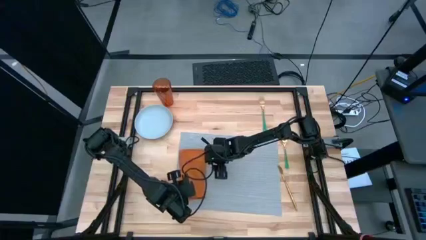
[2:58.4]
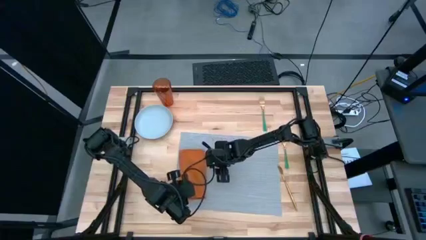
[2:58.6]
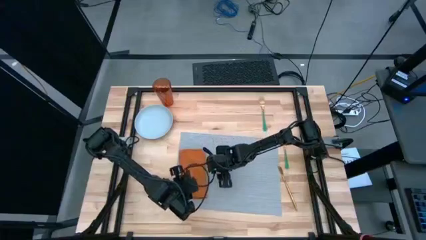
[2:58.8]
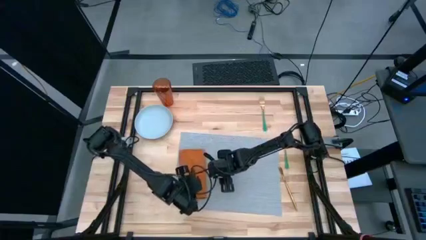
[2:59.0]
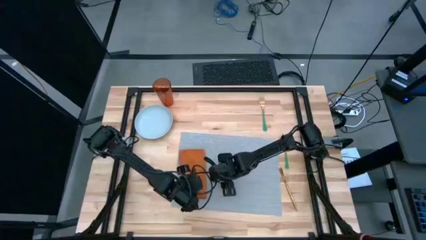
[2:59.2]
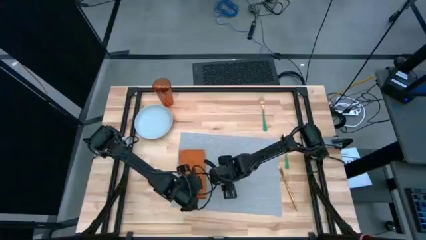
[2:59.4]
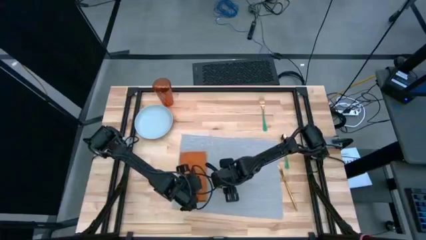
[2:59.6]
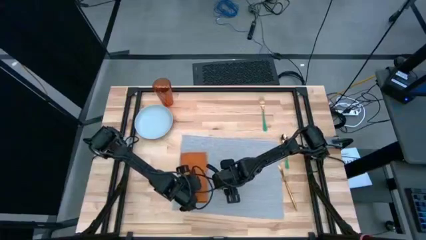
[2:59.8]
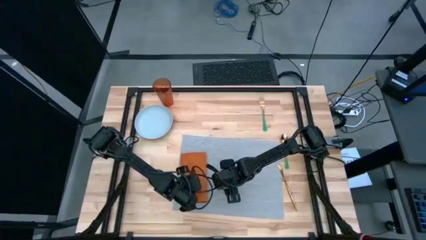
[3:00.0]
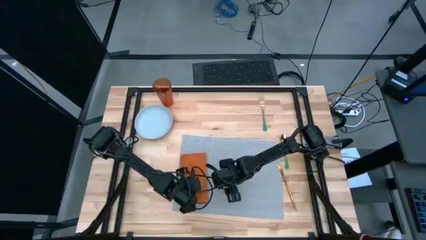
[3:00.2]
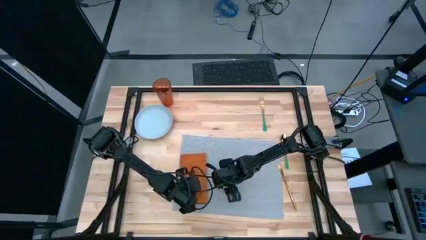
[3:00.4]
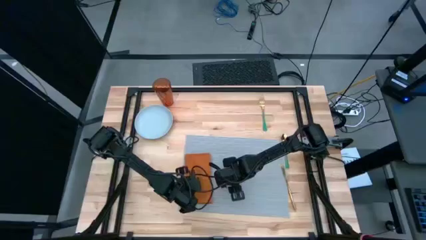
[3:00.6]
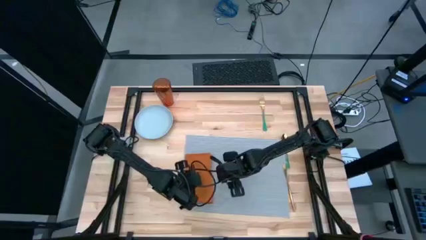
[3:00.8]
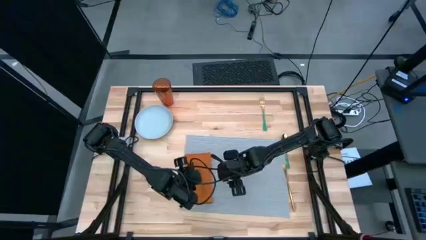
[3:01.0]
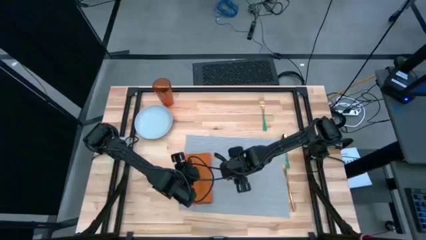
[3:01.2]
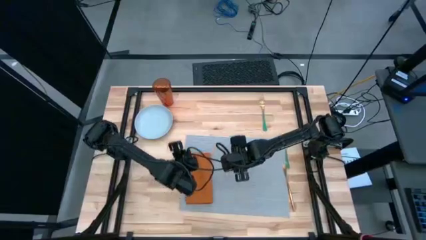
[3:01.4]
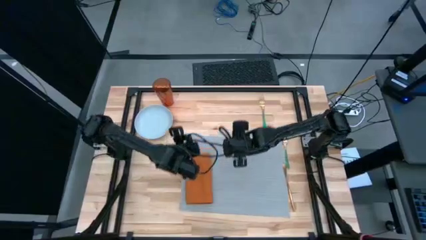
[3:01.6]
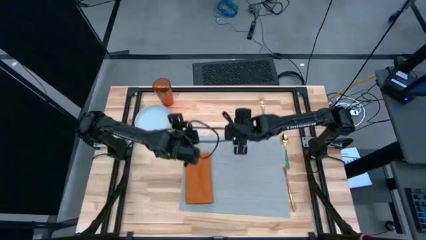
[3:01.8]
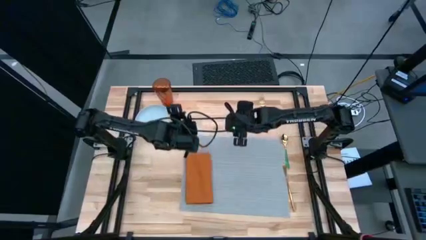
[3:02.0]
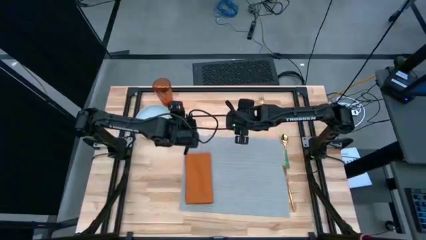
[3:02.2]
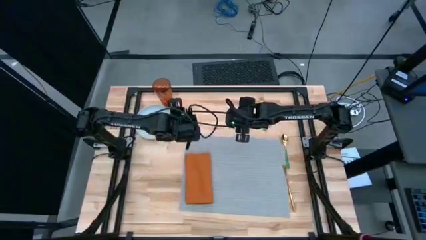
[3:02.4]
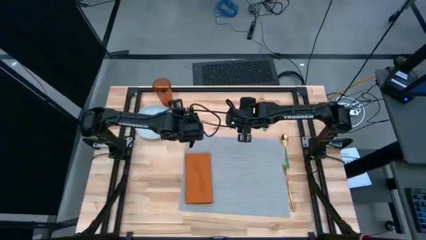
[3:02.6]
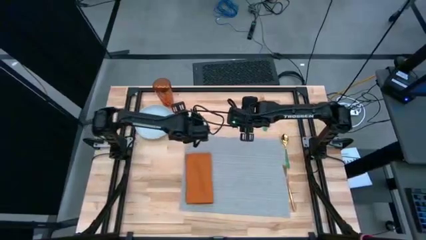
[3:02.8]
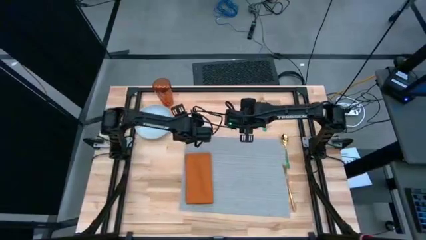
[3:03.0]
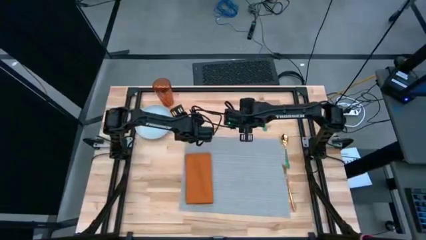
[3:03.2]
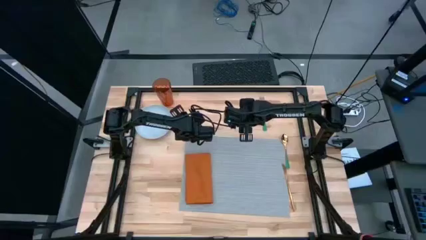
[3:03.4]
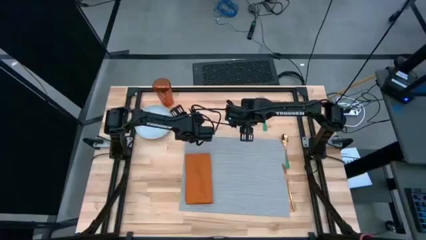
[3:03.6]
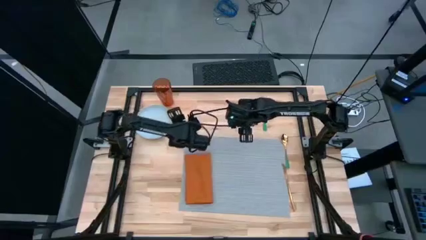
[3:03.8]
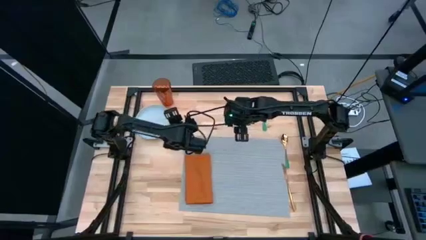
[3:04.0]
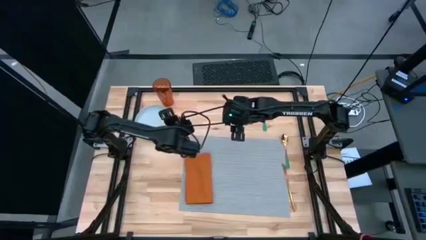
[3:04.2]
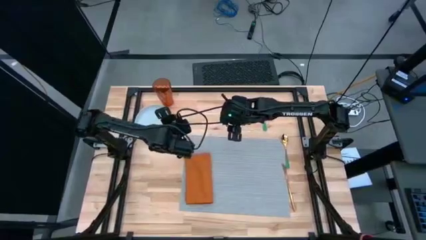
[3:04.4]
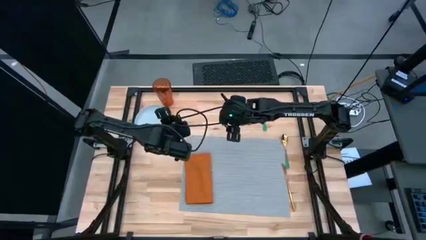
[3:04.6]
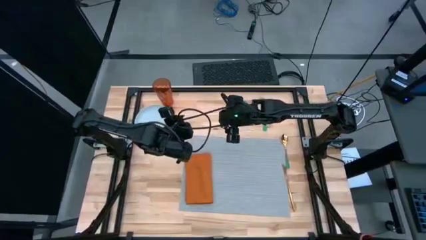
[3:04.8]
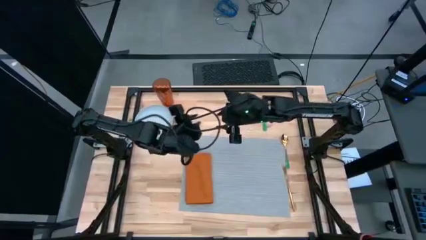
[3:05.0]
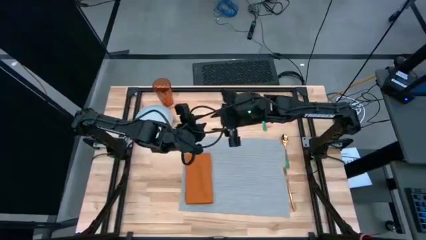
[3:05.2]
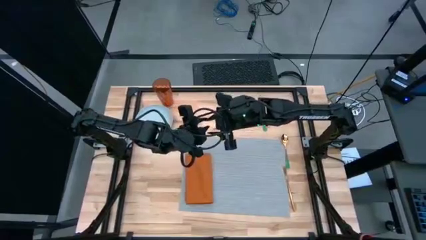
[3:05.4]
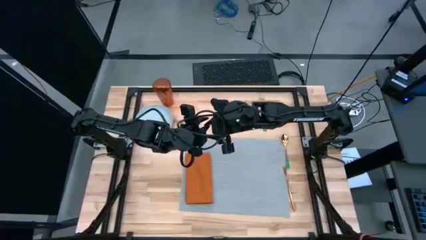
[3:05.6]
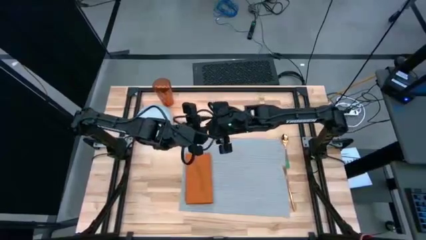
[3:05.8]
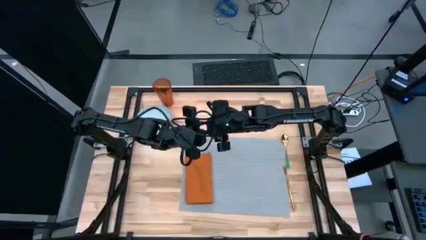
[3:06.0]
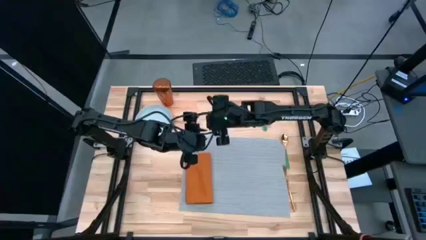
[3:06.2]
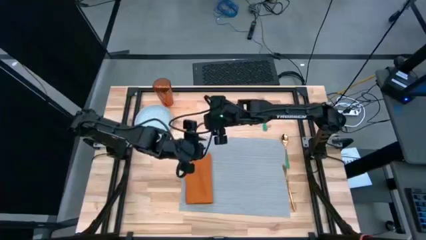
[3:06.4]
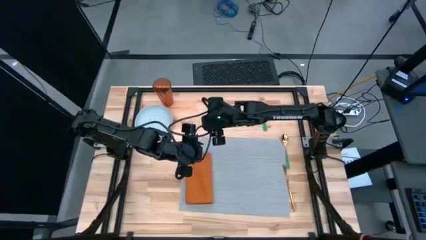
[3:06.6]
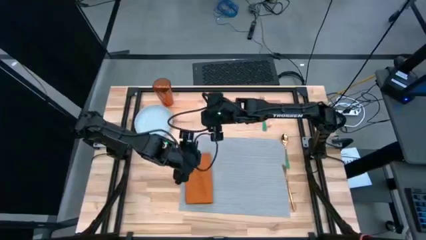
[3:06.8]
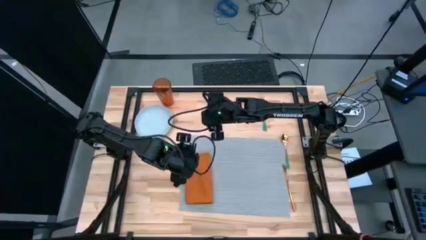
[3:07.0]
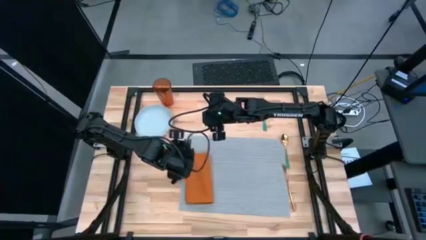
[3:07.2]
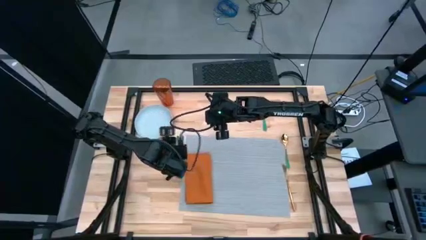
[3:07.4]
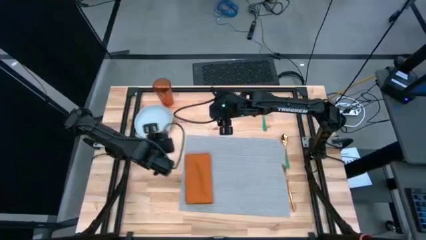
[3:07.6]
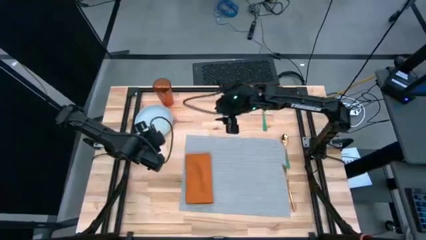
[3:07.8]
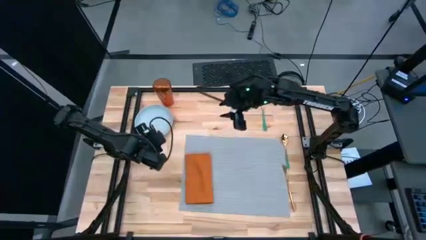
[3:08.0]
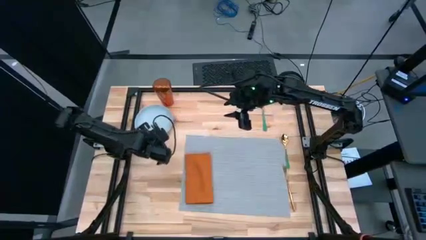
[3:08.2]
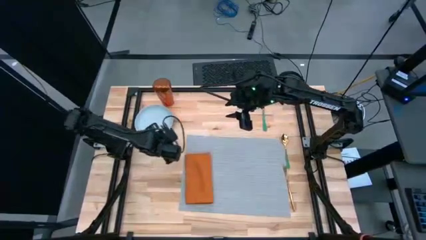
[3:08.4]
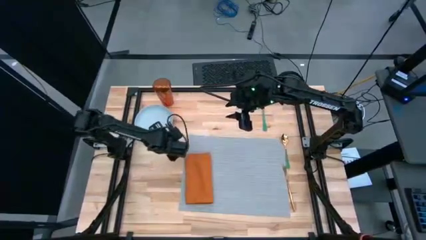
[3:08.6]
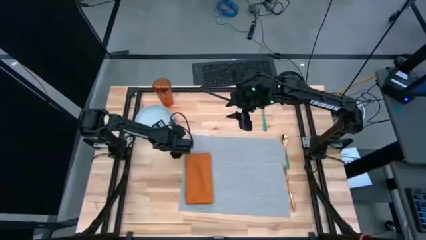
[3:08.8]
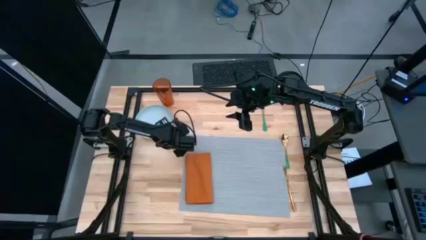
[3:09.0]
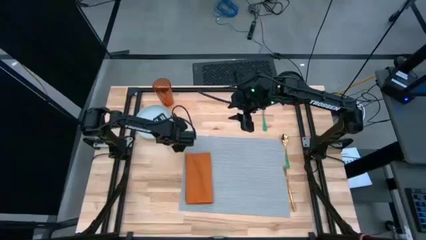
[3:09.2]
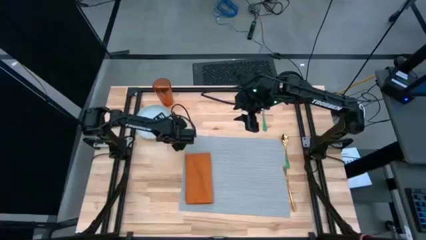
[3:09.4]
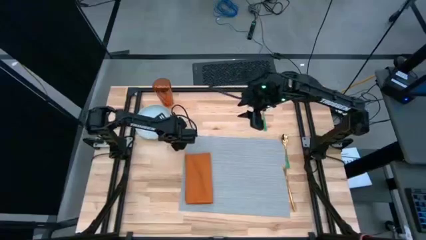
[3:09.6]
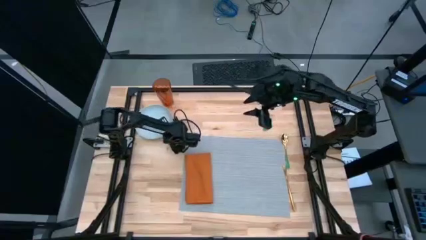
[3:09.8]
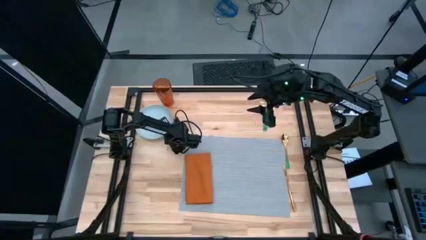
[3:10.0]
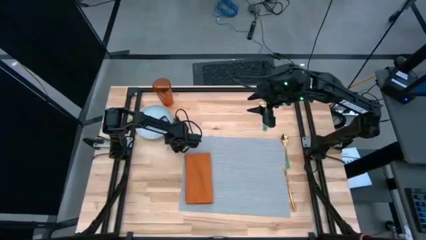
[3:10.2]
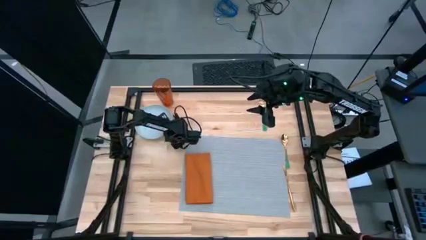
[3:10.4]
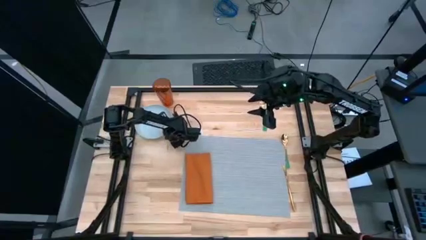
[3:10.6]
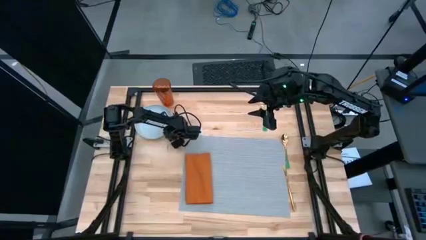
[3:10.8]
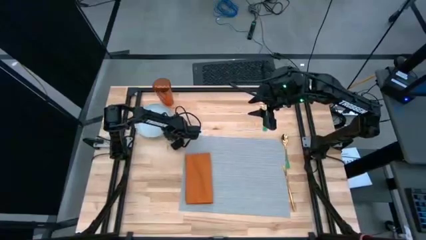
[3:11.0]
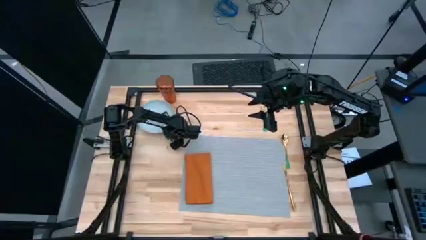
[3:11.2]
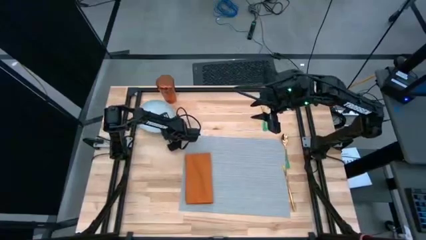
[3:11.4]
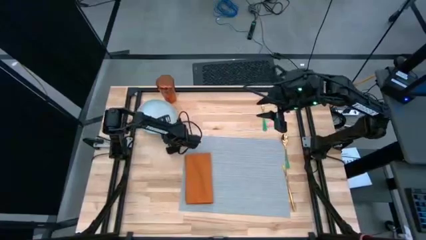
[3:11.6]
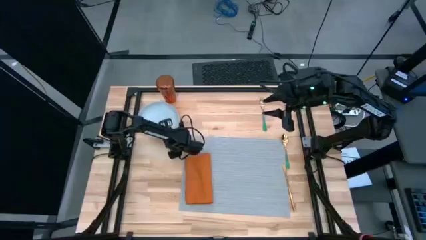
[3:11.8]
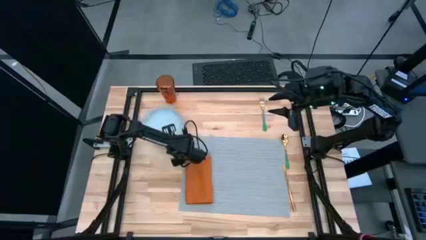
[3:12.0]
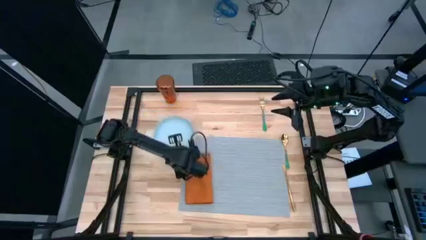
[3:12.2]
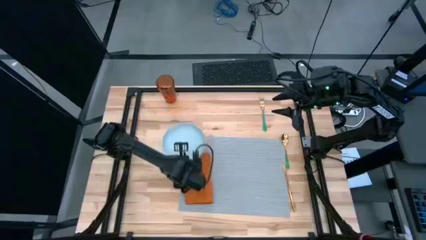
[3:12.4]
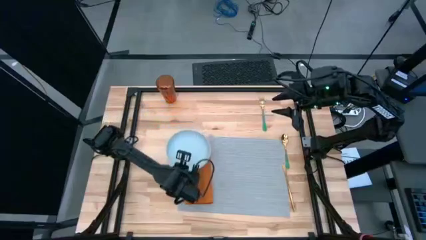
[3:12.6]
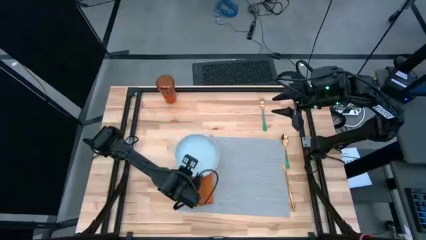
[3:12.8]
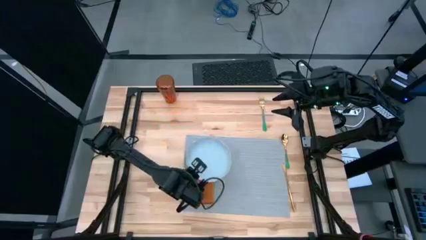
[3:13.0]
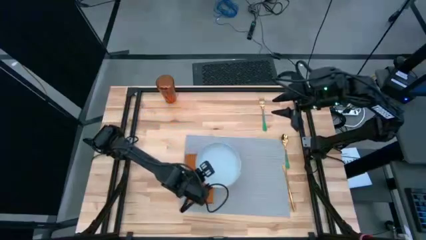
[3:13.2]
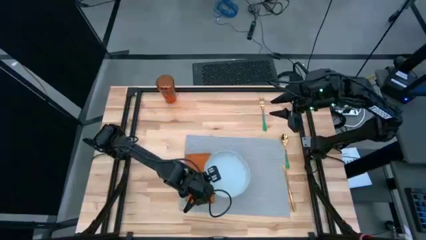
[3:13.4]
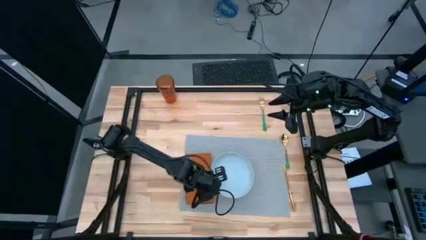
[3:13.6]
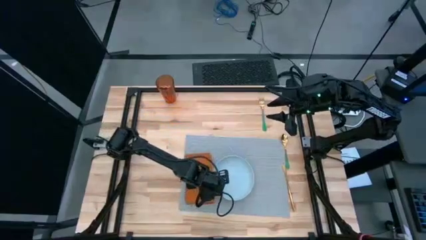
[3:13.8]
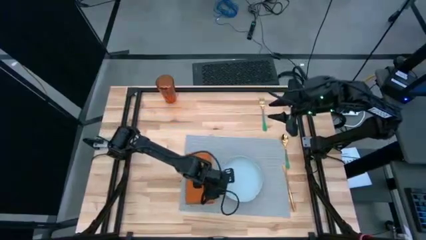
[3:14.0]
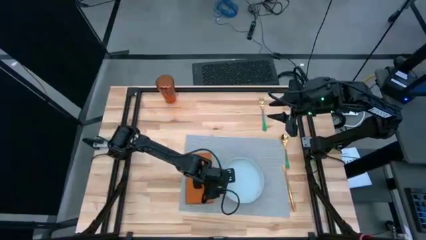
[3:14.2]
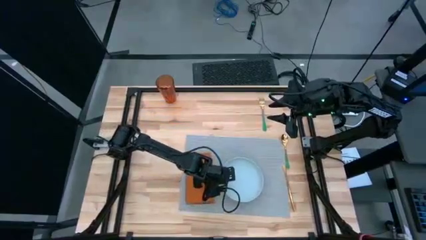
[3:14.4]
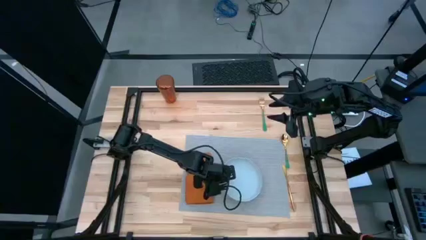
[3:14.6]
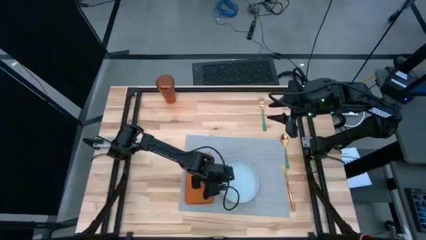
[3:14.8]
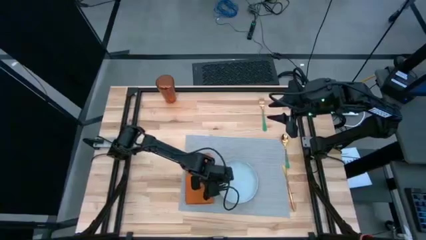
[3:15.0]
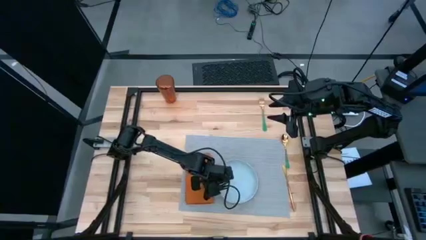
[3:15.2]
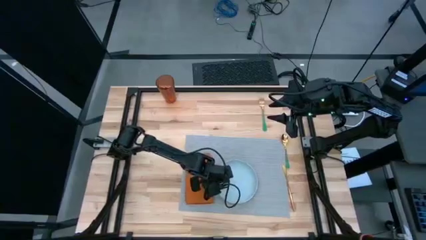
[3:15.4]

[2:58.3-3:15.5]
Task: Set table place
Put the gray plate to the right of the orange napkin on the gray placemat

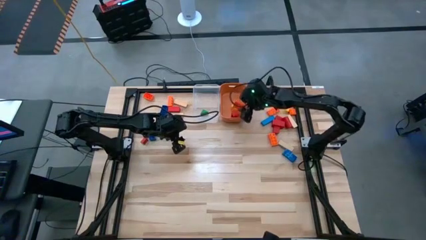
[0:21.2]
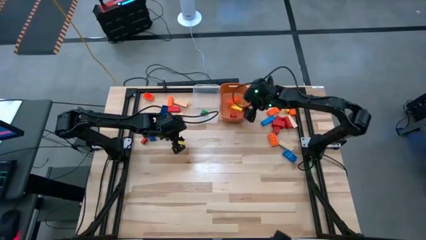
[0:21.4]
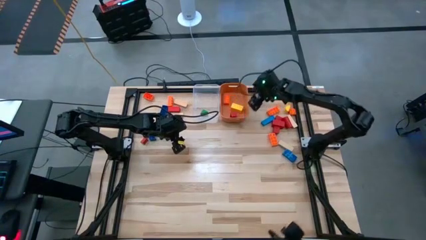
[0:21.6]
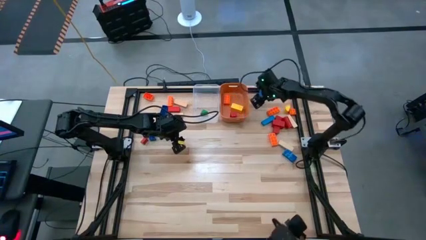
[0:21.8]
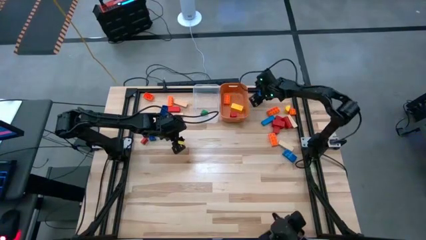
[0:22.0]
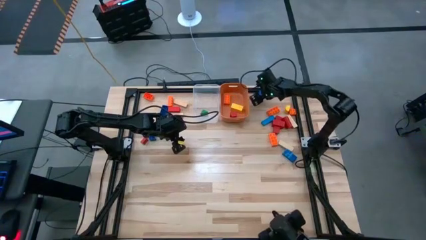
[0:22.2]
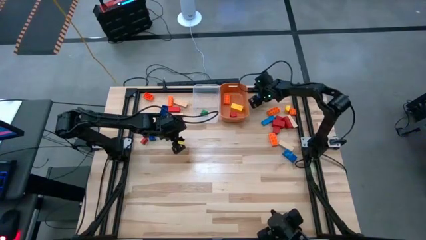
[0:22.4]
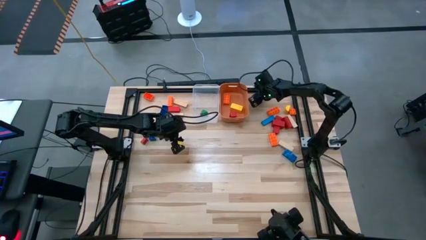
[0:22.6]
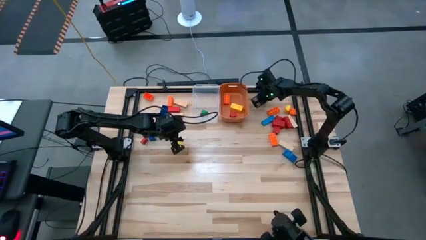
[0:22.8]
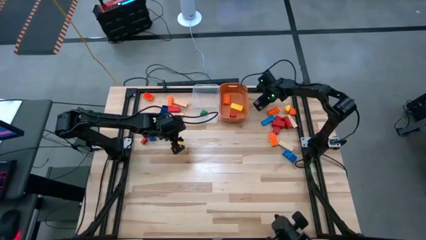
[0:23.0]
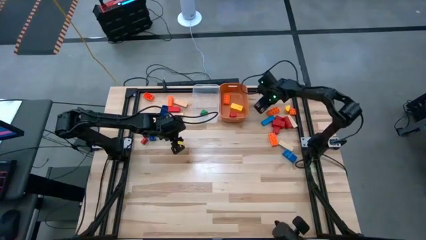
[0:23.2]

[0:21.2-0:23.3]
Task: Sort blocks by size
Put the blue rectangle game piece into the orange bin
